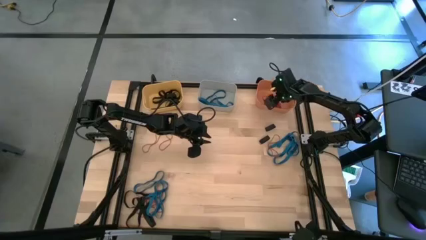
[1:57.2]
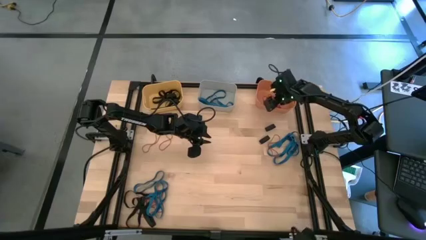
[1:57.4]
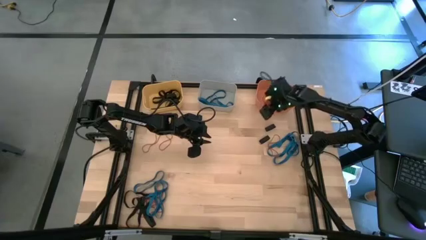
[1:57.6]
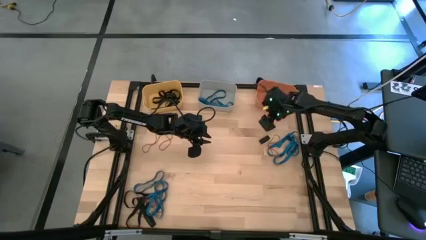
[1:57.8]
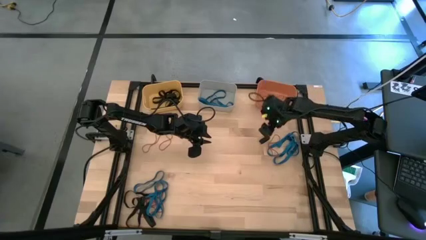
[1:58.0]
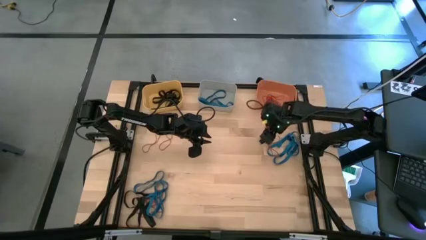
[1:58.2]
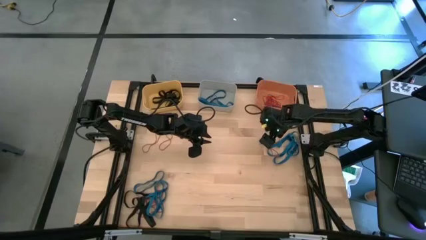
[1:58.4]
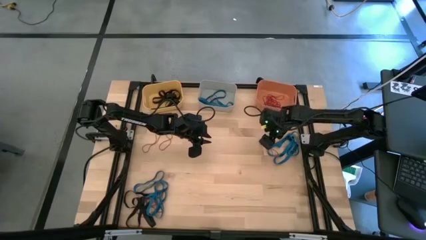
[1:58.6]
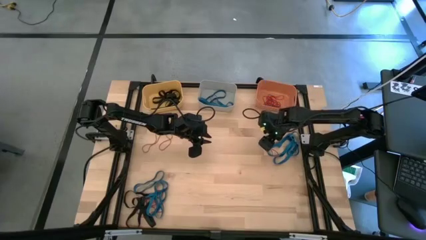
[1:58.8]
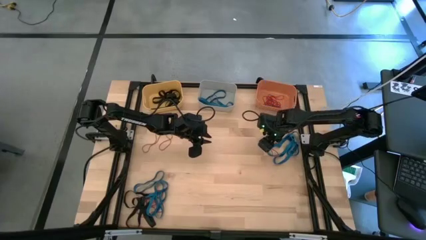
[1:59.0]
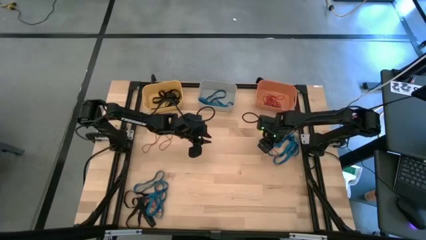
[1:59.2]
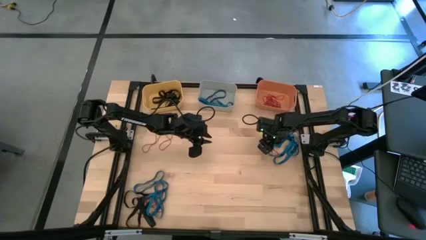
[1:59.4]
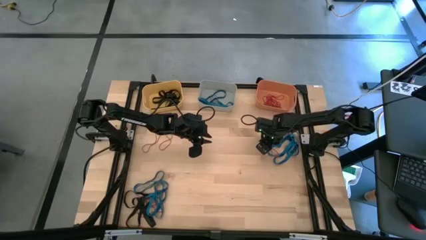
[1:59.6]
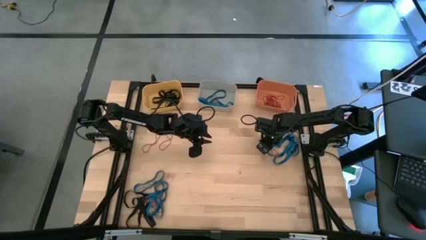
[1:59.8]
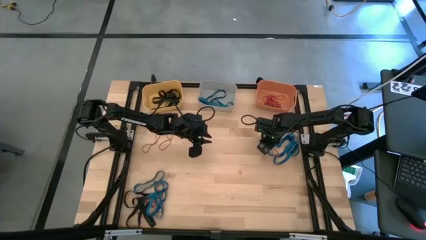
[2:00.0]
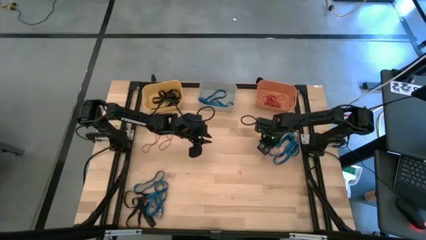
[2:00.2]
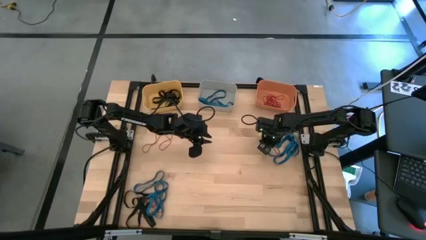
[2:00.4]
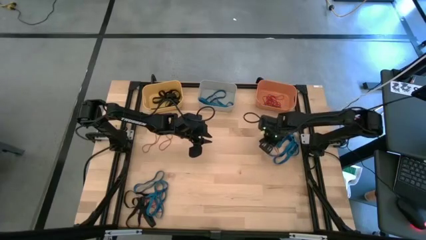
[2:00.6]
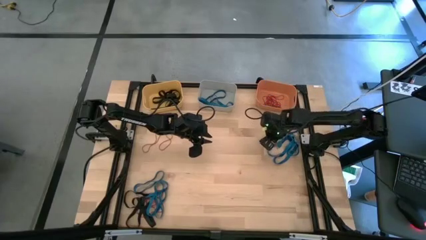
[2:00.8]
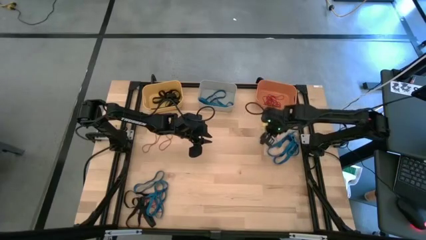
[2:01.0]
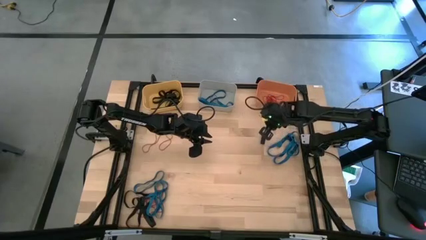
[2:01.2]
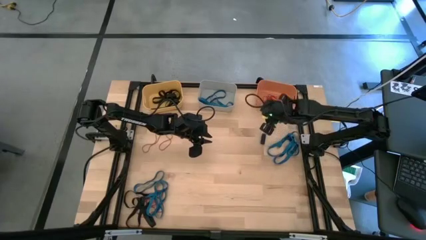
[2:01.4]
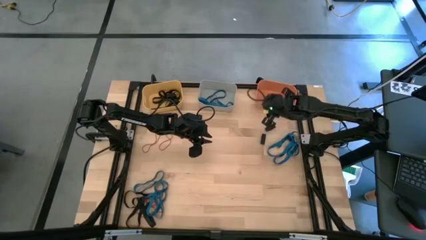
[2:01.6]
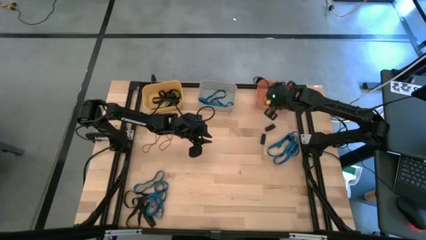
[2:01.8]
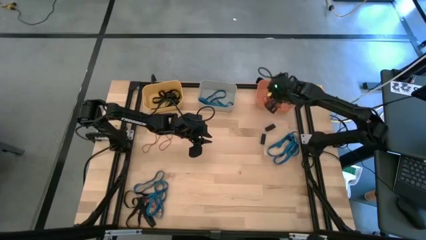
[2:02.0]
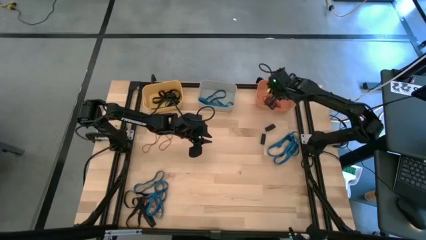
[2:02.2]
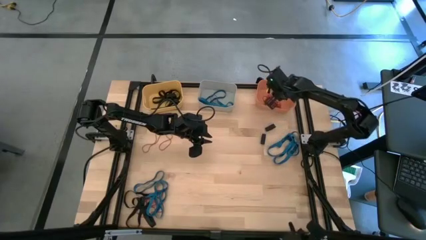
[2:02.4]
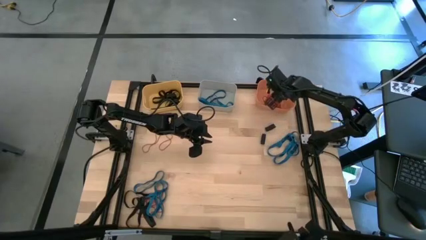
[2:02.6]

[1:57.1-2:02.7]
Task: Sort rubber bands into baskets
Put the red rubber band into the orange bin

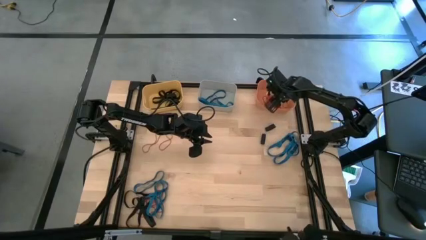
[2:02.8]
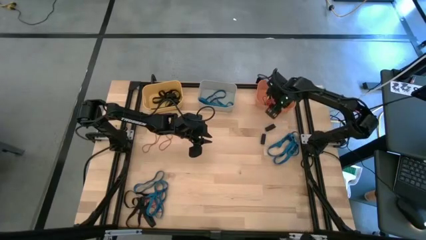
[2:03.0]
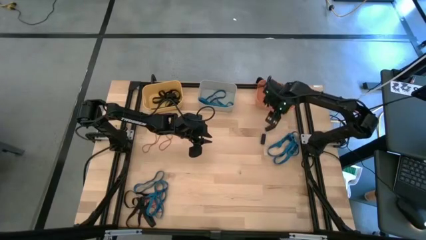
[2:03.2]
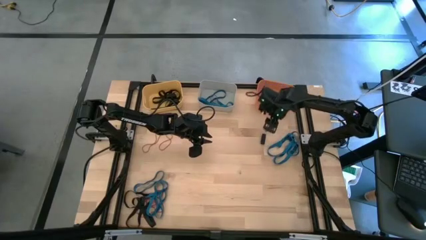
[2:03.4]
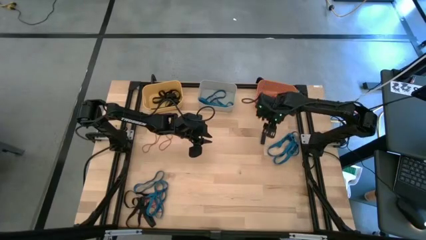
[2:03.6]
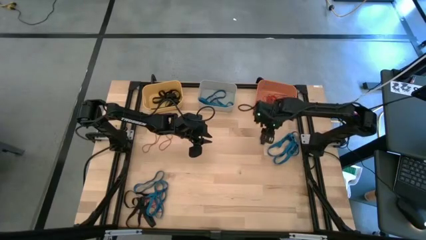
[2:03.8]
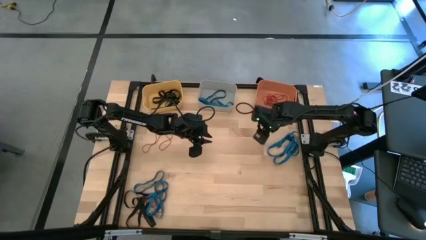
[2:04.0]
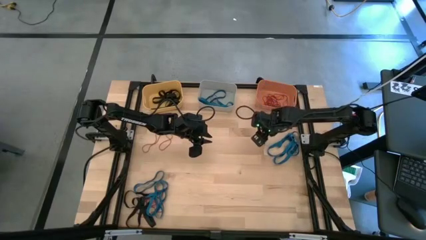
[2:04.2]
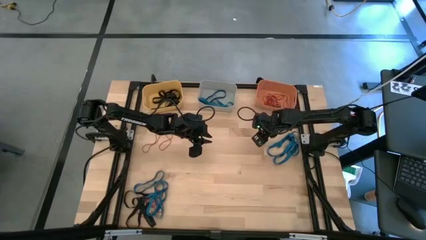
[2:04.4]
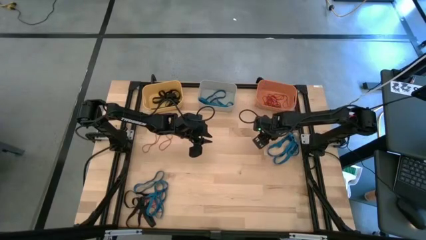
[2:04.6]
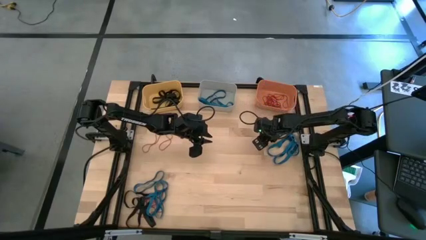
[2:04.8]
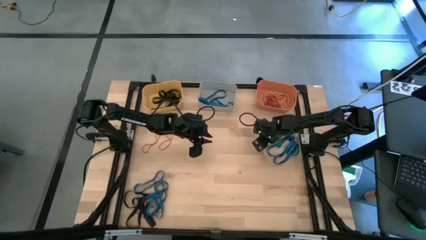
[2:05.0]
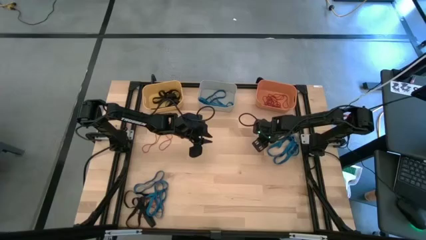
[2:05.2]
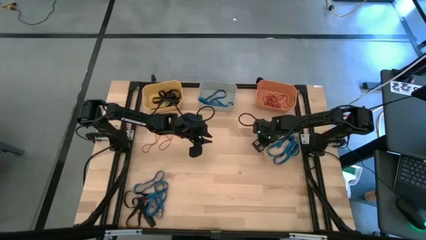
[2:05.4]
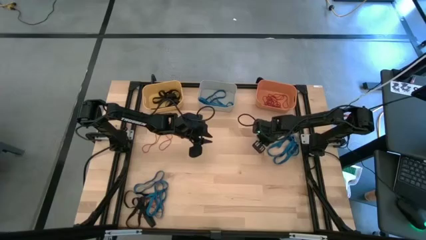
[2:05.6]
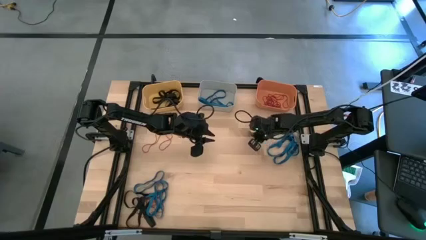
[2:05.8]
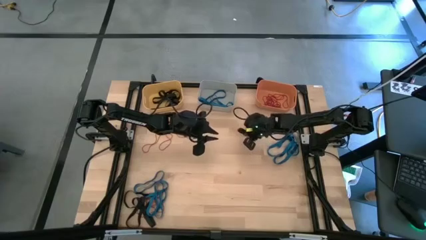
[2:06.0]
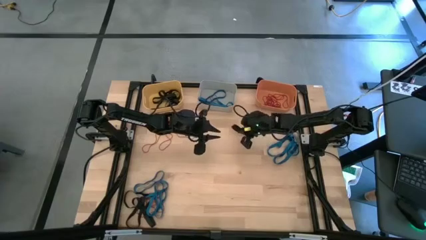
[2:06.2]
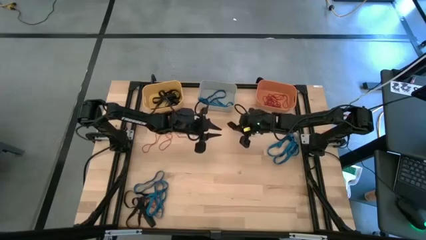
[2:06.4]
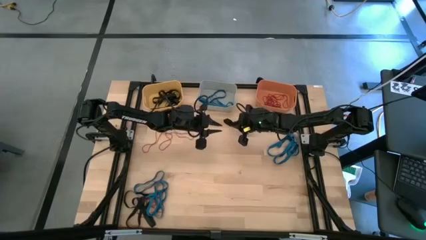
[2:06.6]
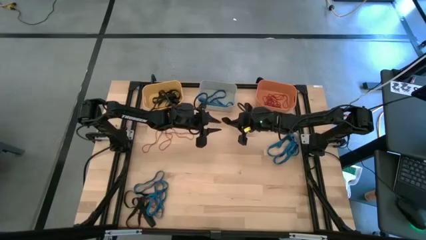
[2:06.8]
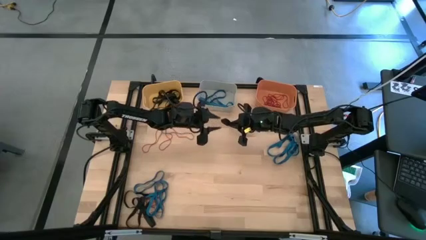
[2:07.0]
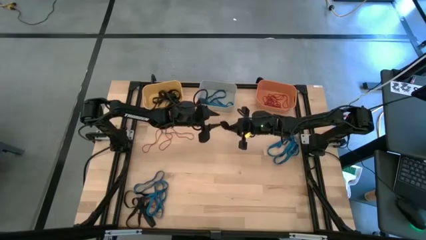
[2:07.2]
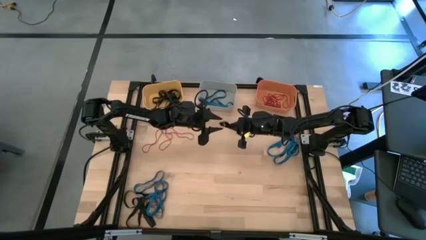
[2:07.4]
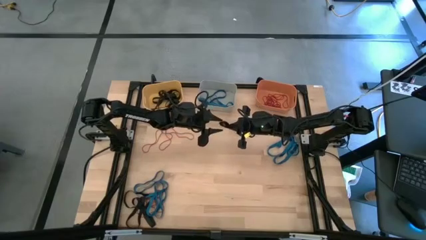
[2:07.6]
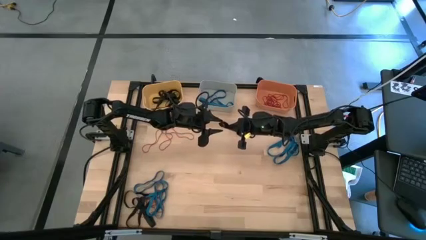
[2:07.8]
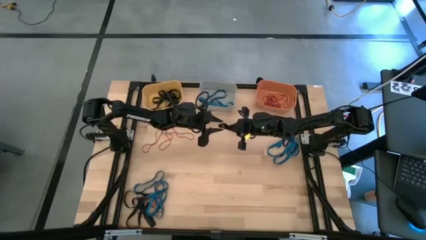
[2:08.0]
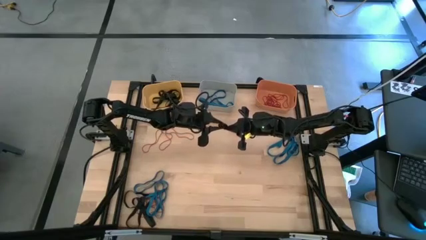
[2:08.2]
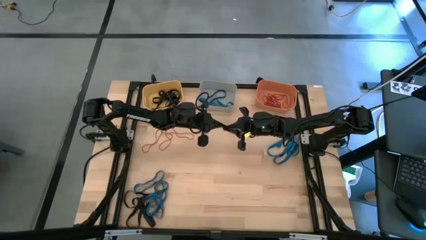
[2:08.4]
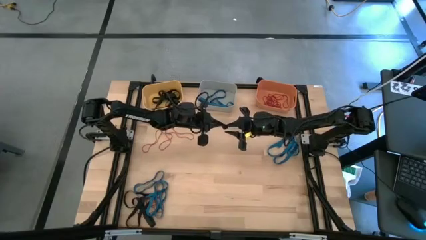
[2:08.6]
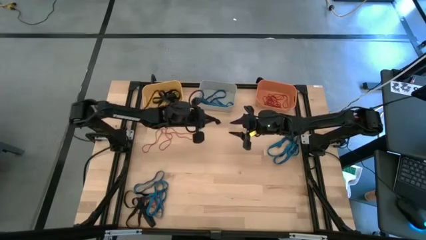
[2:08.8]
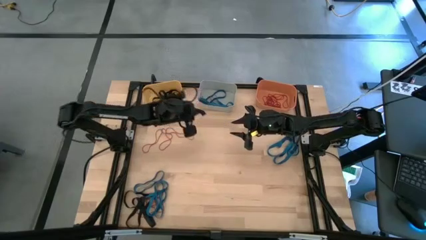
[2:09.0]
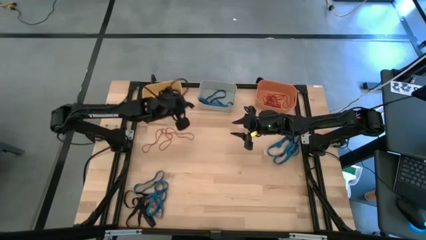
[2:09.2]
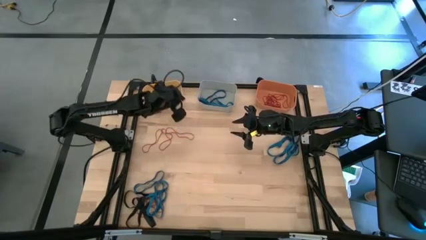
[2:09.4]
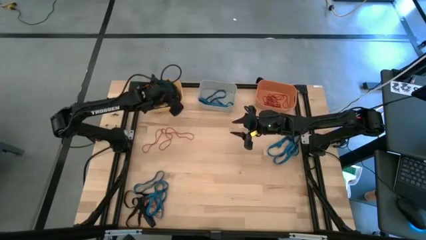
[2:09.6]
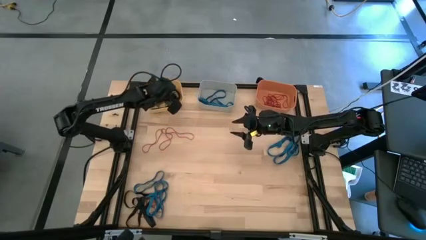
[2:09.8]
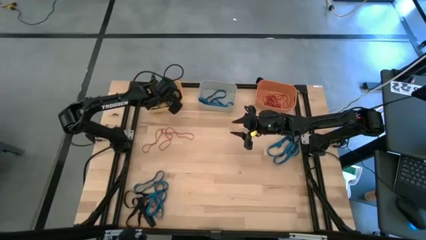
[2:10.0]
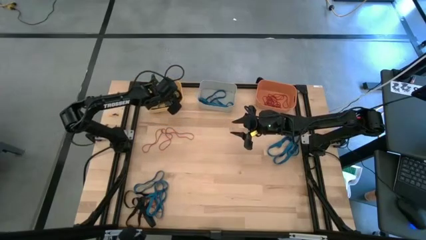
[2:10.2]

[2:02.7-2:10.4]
Put the black rubber band into the yellow bin

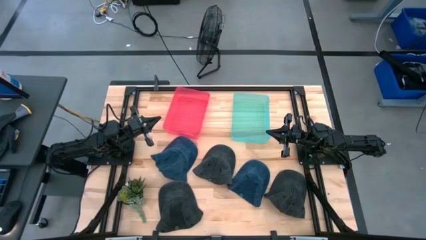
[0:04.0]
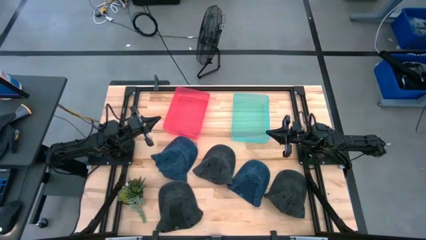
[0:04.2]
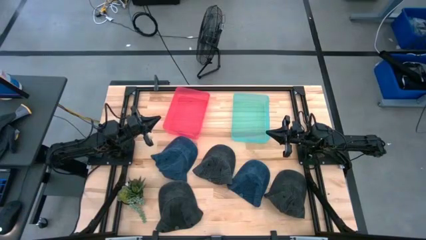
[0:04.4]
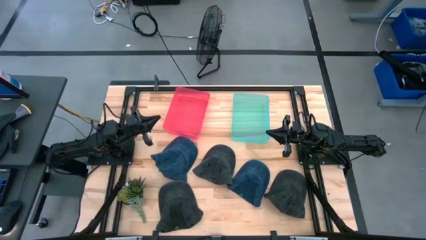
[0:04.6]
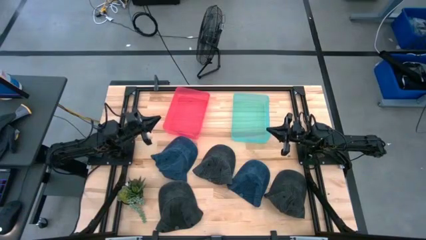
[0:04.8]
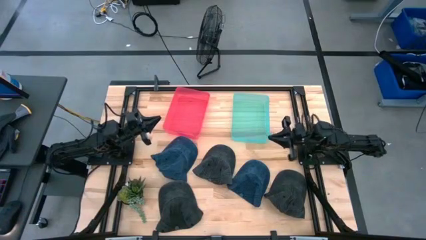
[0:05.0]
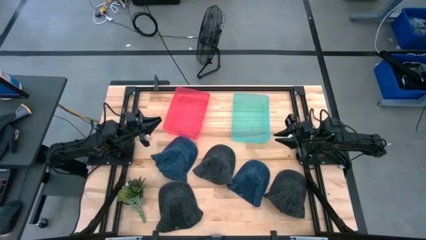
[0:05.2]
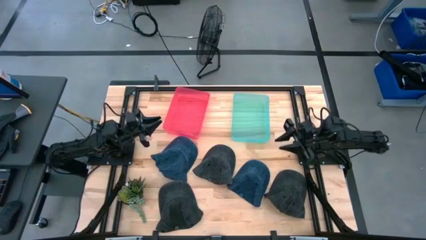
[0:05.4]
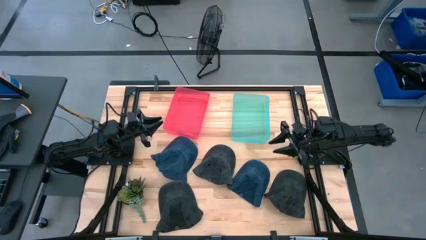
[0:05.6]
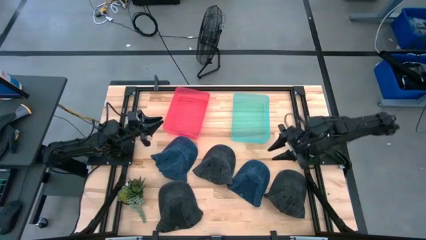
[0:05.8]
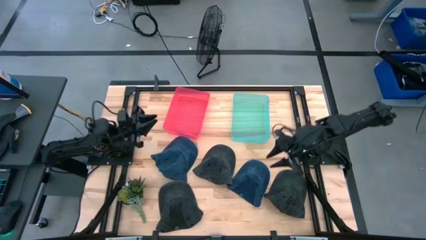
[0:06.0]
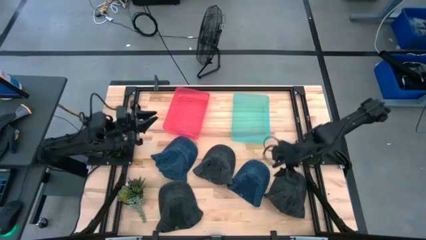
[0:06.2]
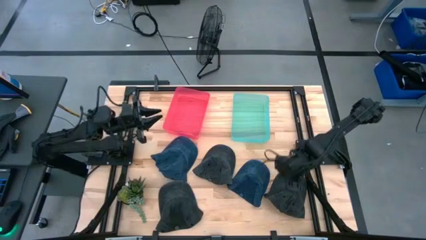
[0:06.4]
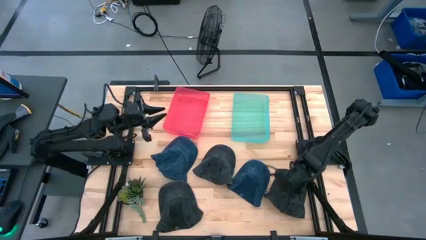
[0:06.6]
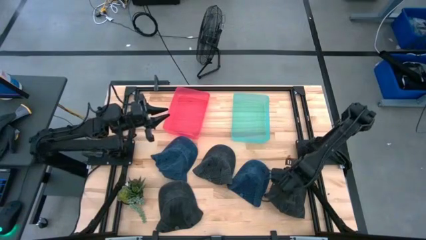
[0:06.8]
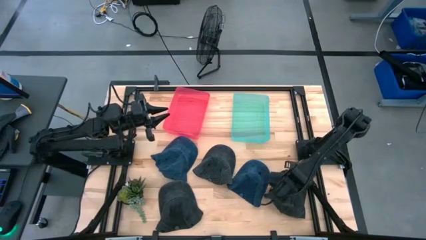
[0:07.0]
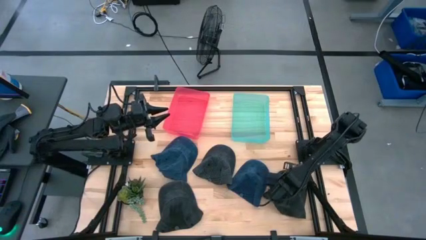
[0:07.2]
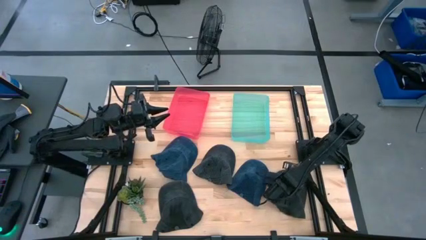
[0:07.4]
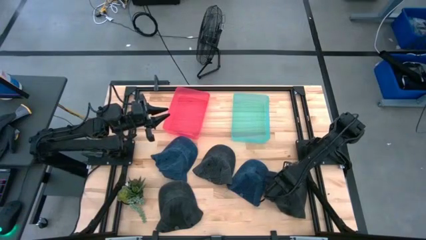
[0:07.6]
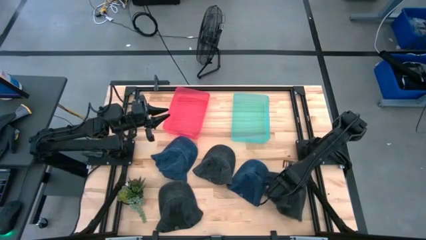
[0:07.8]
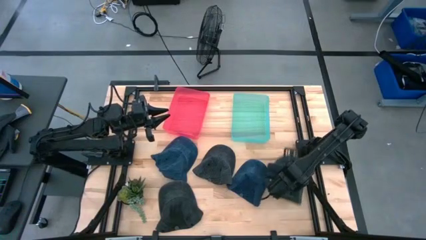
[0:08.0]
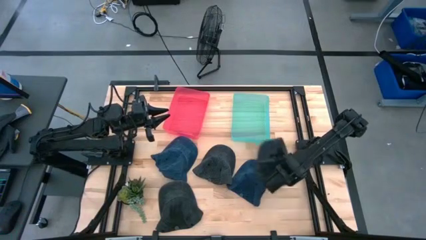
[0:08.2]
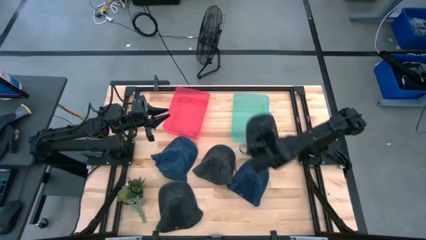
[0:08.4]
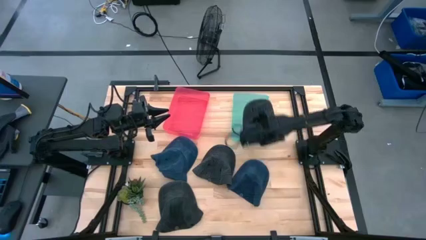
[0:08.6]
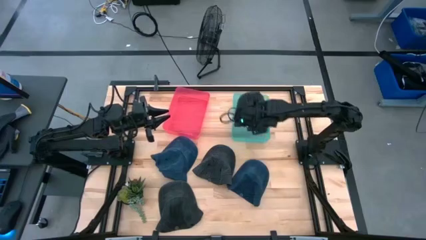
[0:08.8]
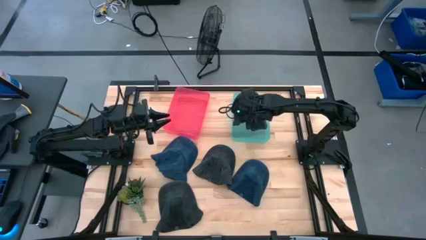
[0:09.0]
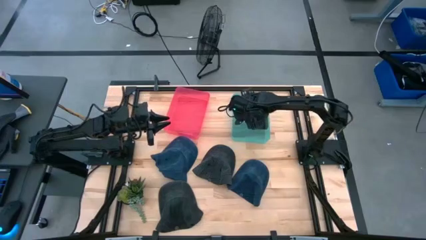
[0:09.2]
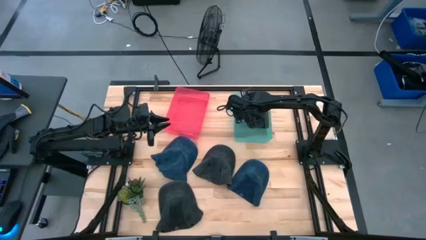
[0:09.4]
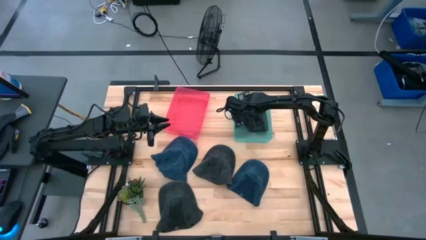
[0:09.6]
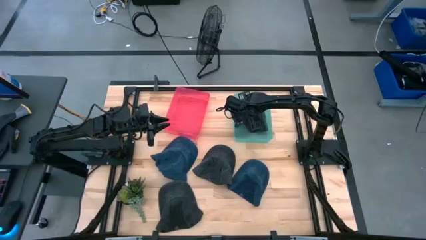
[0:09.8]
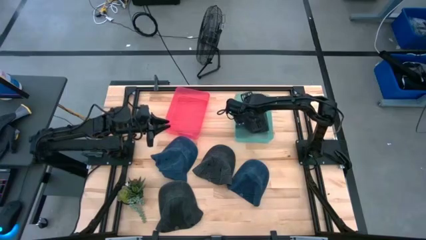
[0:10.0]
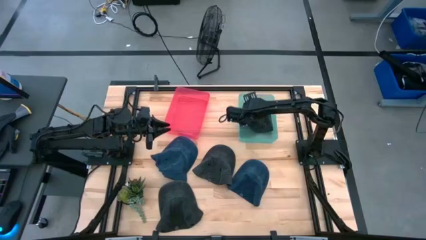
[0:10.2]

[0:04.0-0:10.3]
Task: Pick & Place hat
Put the bottom right black cap into the blue bin
